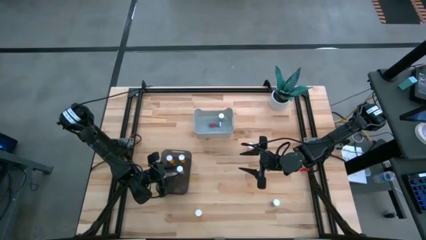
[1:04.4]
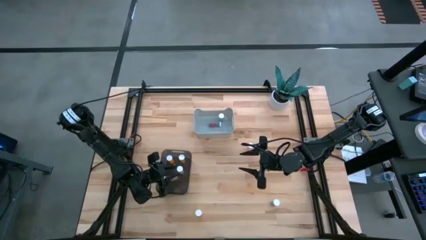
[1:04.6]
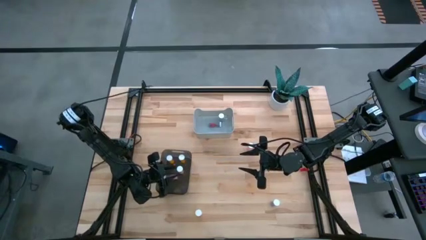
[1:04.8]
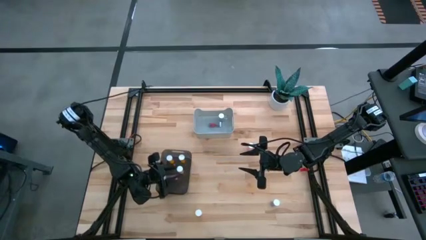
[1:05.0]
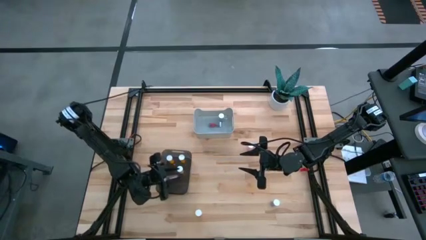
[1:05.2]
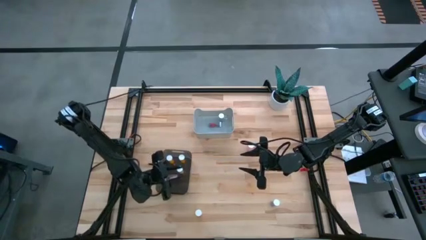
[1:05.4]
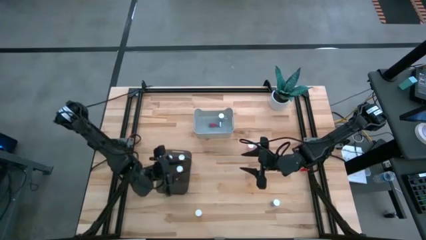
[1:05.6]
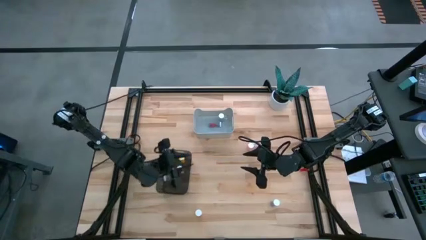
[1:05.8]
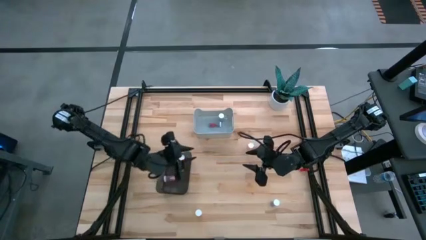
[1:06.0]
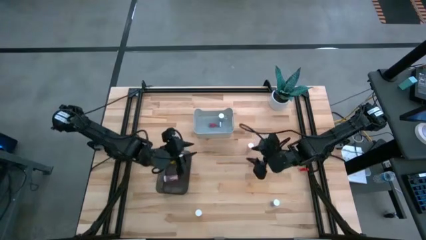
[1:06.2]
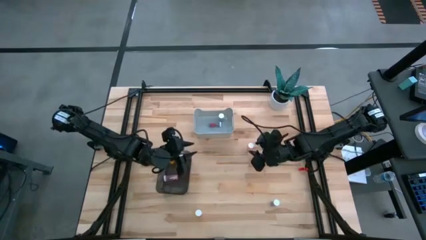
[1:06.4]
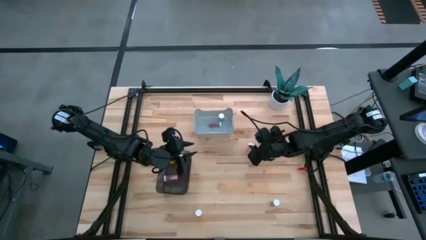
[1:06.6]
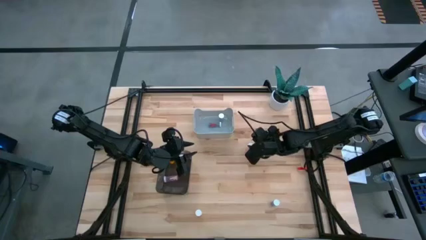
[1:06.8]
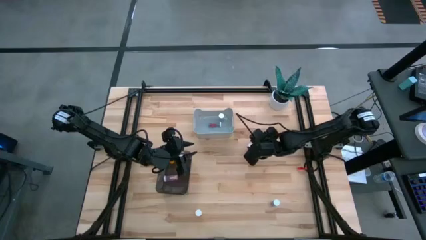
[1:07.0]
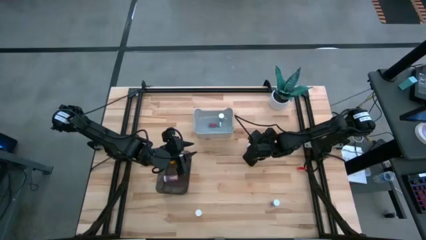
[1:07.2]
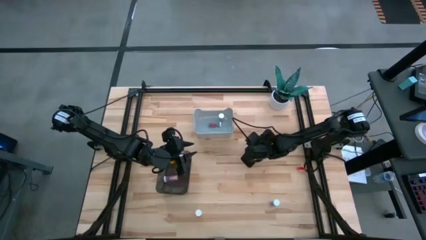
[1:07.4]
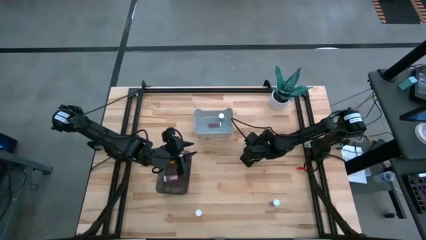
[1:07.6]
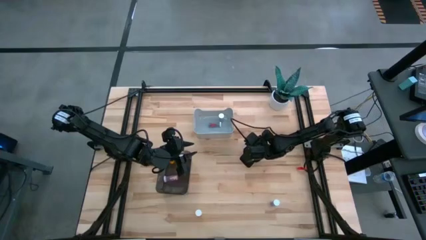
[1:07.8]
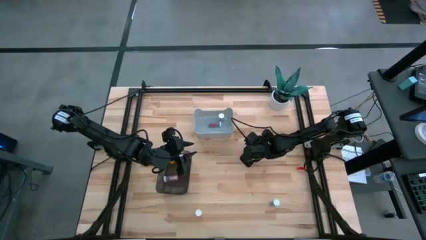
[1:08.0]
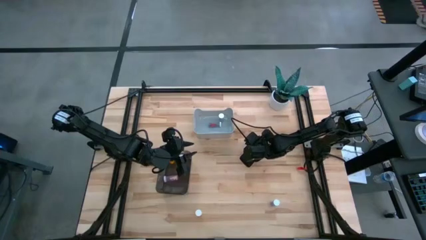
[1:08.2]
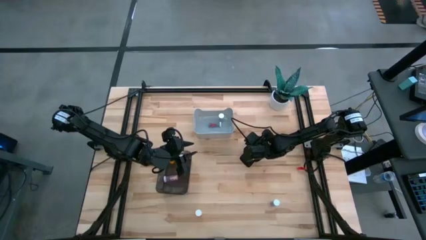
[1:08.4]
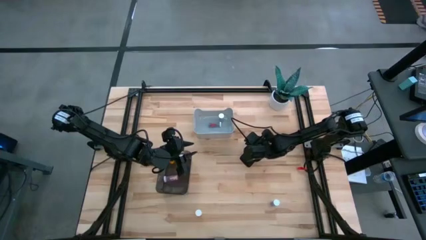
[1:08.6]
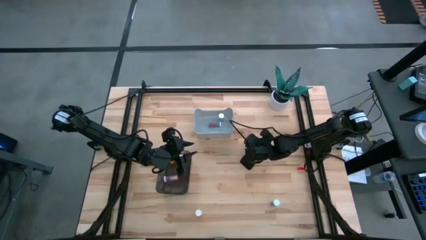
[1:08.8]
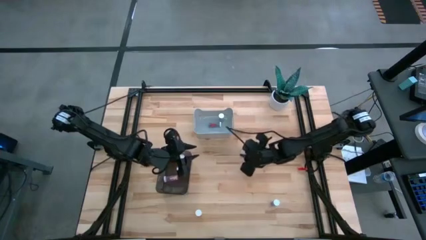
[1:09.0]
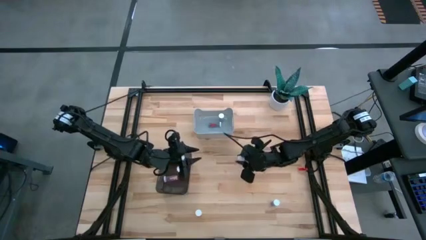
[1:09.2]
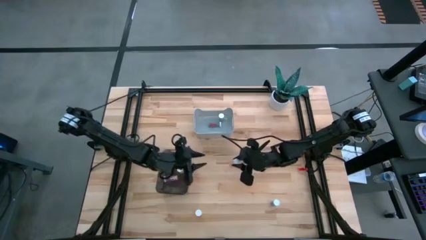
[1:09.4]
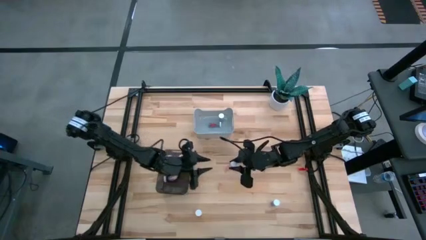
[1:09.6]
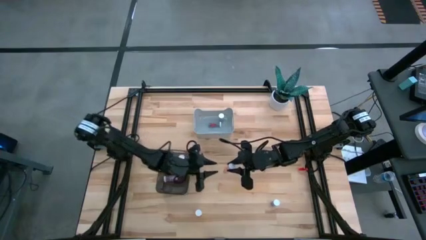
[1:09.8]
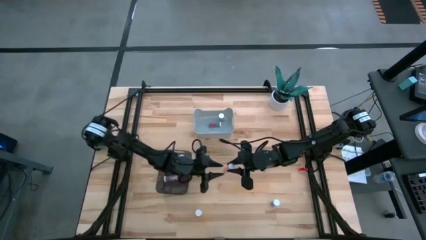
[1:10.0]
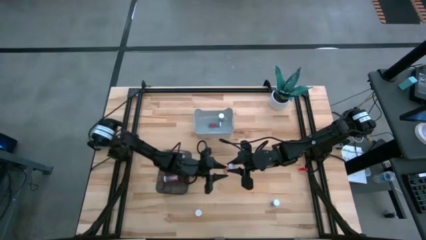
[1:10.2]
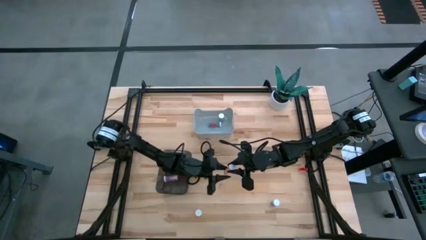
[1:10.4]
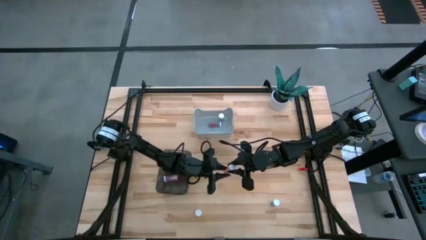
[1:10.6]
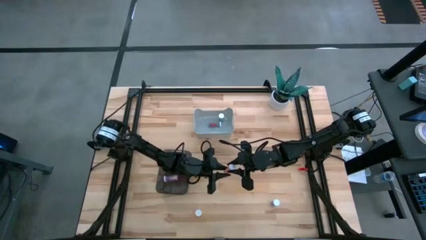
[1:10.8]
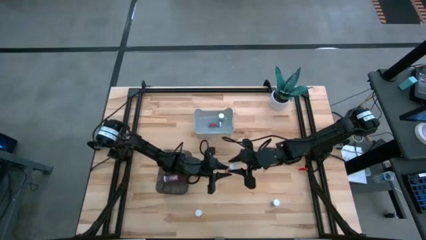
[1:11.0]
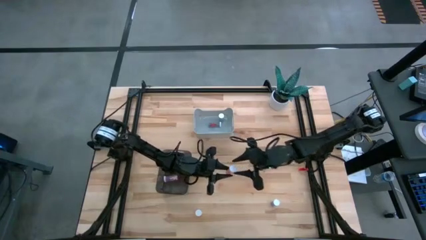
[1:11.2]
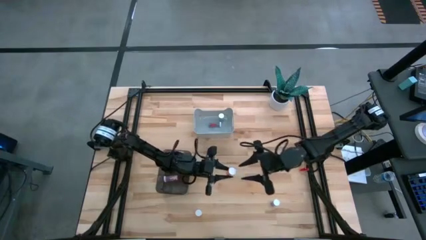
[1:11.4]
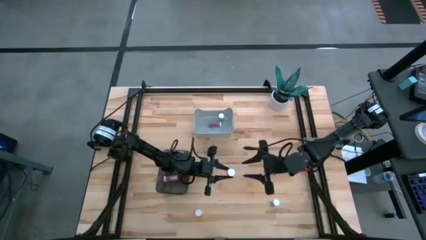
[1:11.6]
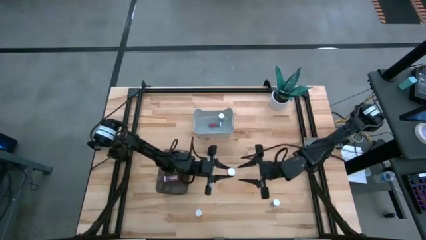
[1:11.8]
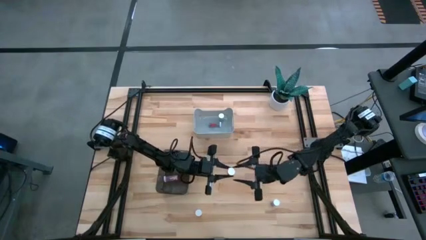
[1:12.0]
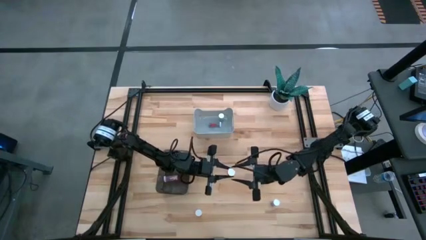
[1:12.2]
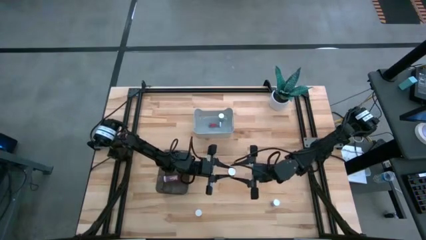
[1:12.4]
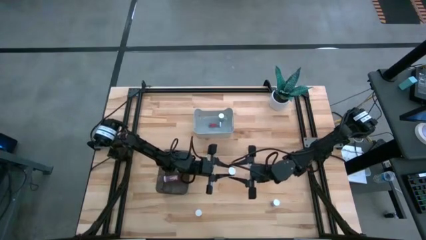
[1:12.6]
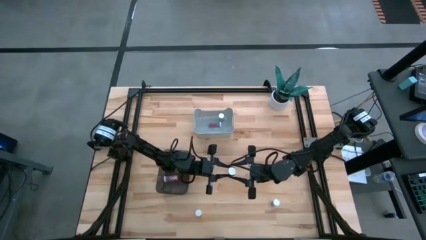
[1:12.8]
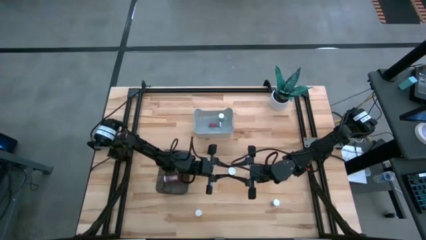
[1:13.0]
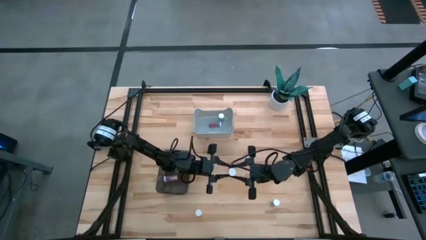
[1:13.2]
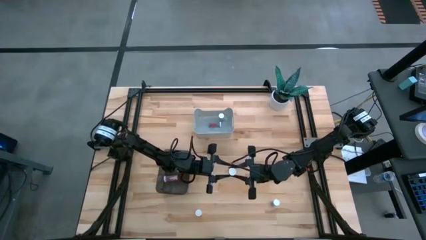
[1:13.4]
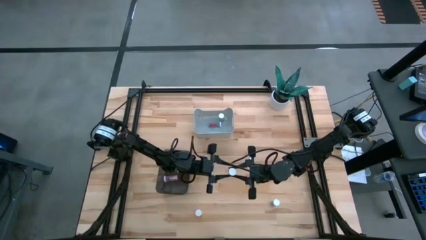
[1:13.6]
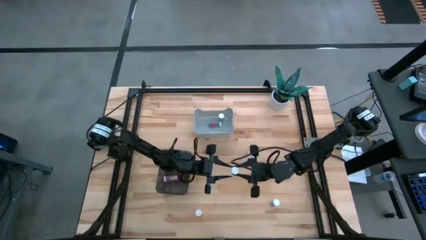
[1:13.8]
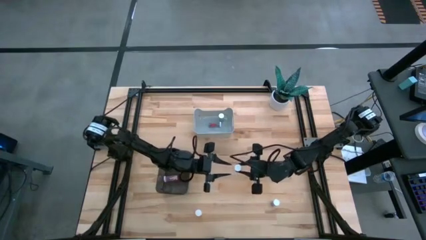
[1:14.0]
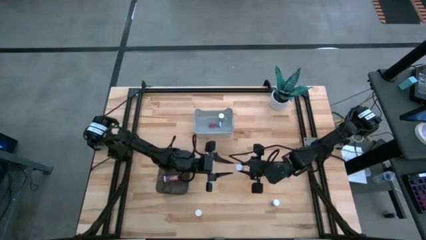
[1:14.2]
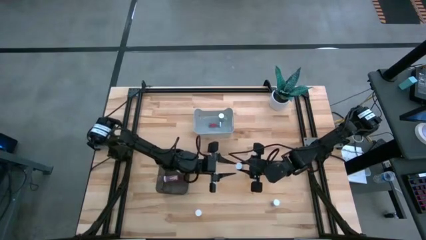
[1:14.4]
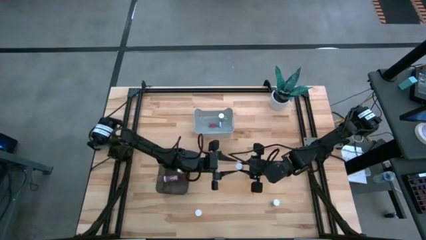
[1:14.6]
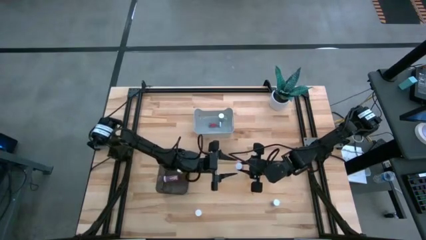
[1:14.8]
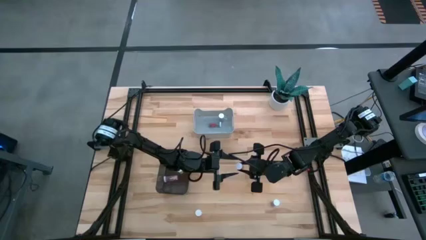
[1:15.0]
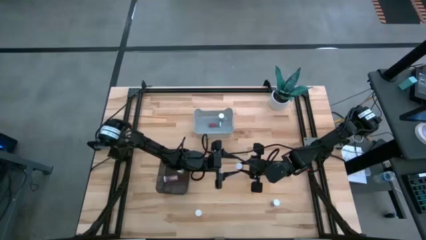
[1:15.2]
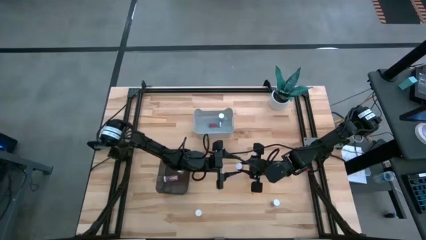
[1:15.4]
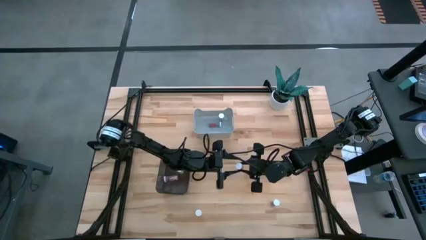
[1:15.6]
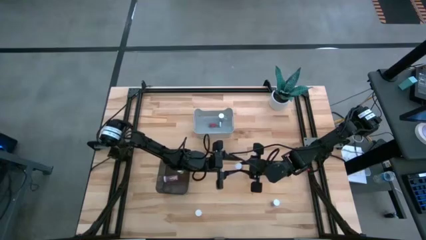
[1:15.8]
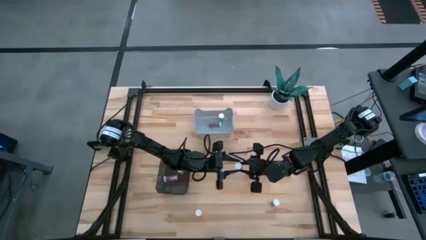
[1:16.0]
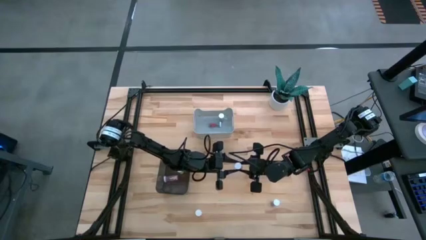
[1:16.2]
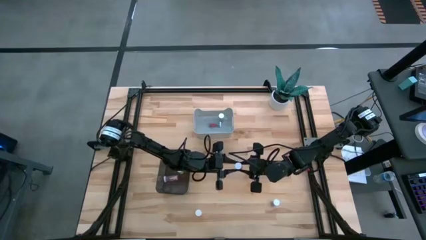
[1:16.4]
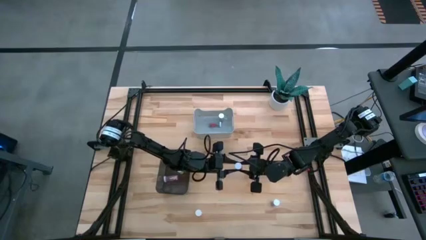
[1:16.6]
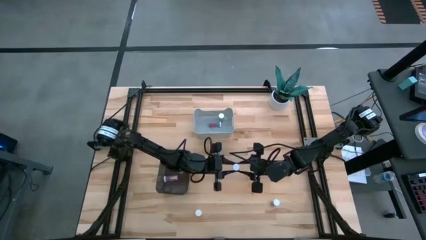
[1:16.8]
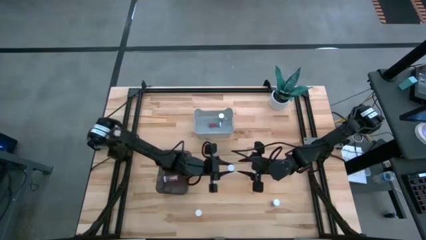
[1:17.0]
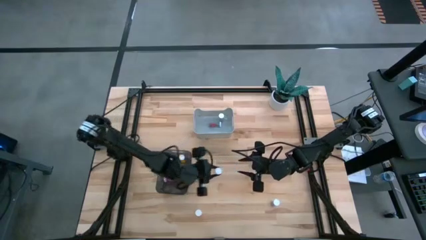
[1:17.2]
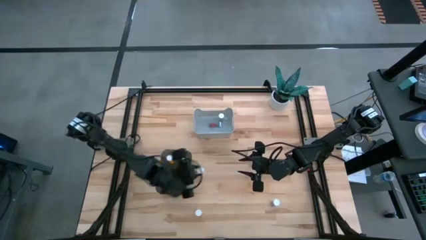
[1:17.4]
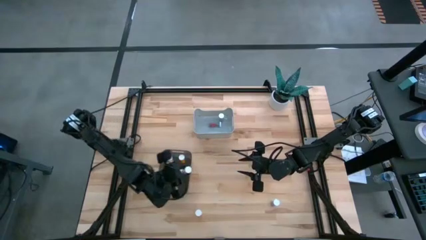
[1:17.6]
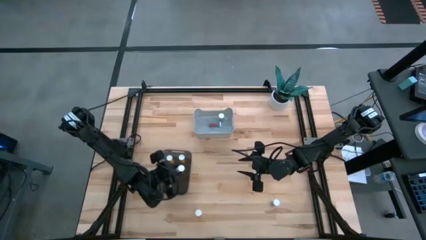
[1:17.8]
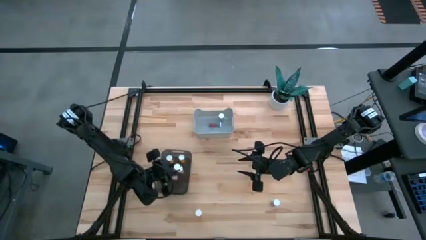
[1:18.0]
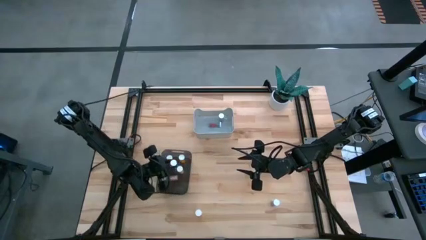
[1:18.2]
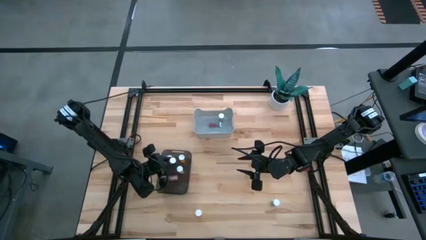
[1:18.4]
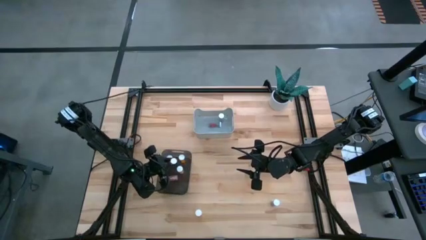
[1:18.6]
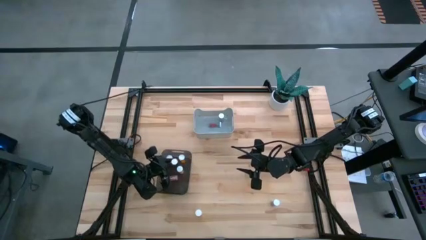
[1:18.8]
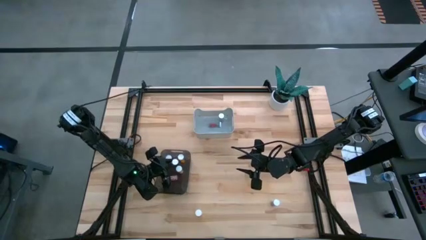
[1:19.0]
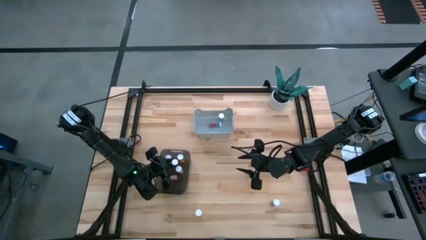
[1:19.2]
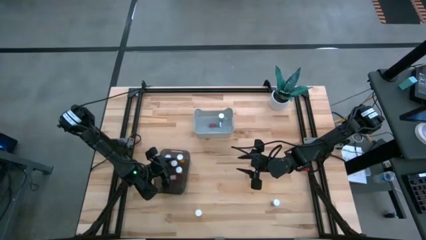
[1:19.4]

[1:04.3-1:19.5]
Task: Pick and place medicine bottles into bin by pill shape (circle, oval)
Put the red tablet bottle into the black bin
